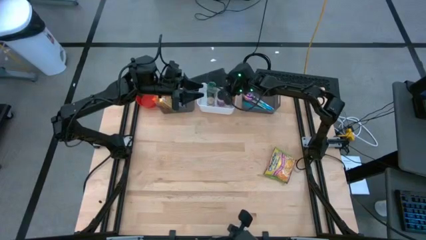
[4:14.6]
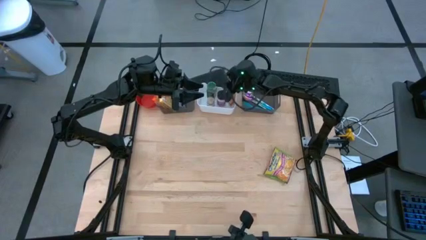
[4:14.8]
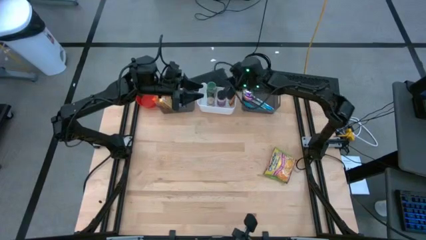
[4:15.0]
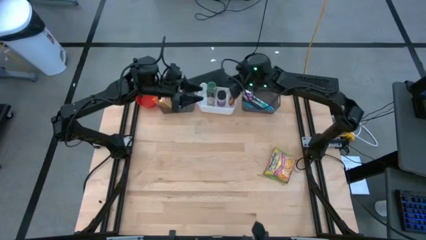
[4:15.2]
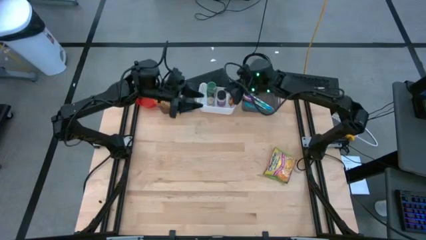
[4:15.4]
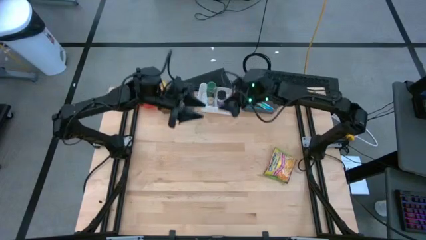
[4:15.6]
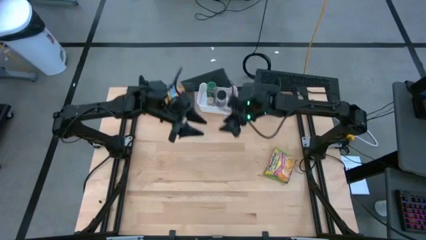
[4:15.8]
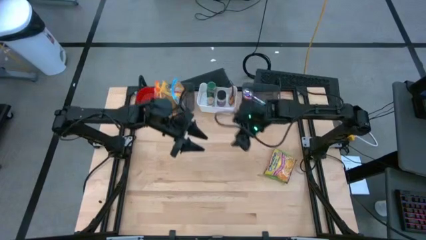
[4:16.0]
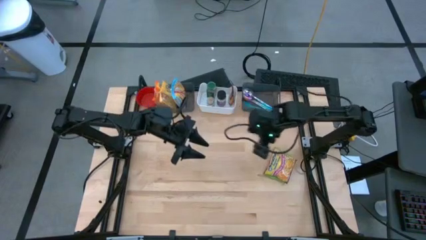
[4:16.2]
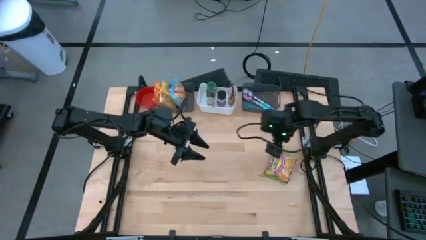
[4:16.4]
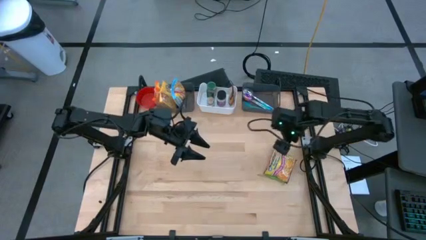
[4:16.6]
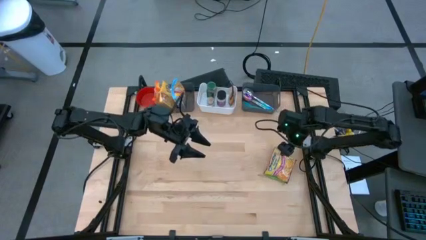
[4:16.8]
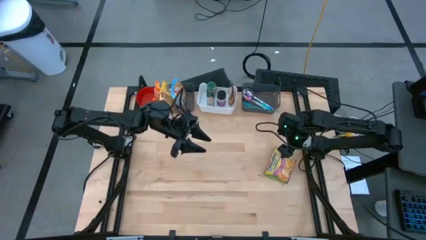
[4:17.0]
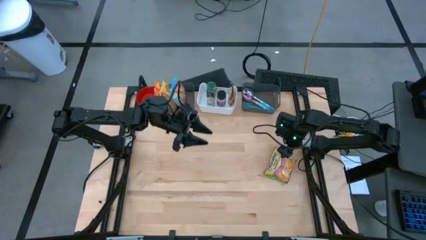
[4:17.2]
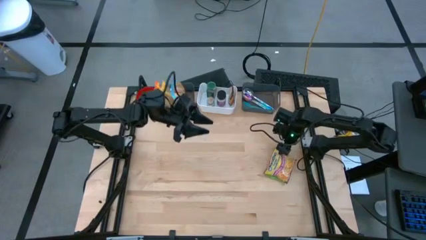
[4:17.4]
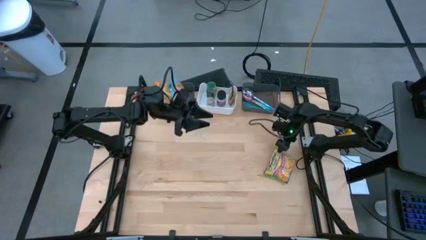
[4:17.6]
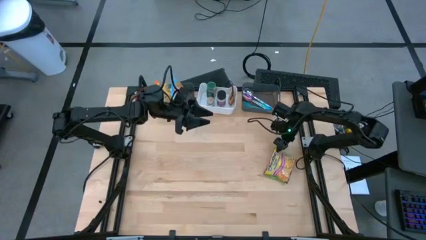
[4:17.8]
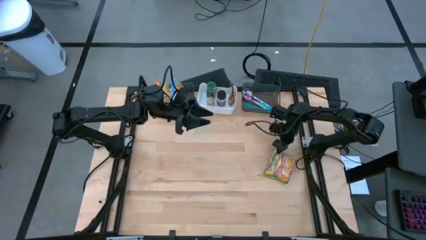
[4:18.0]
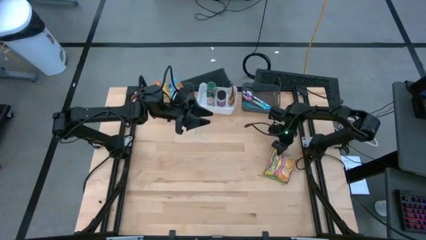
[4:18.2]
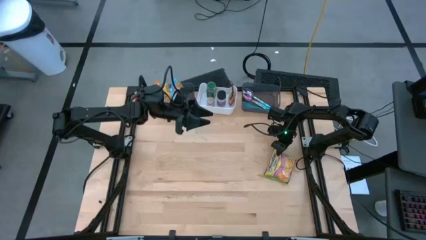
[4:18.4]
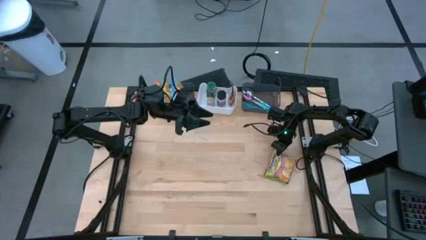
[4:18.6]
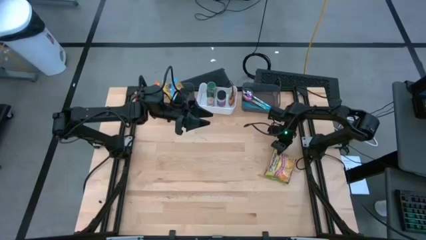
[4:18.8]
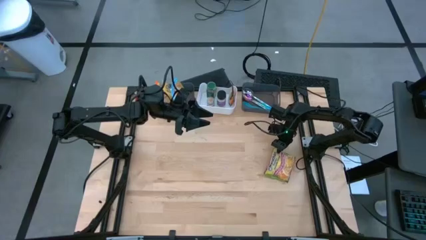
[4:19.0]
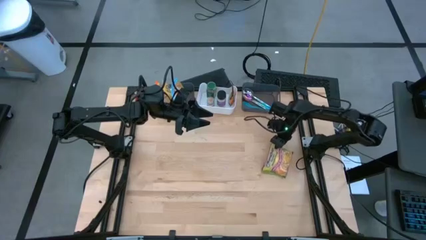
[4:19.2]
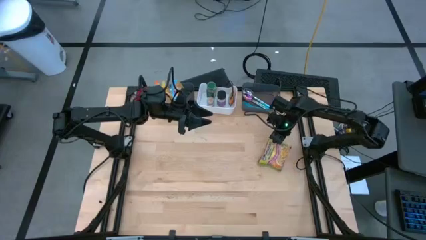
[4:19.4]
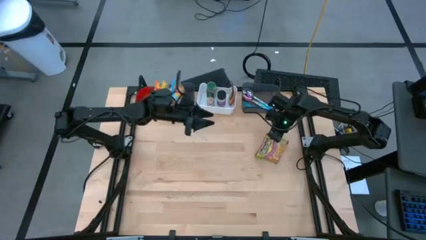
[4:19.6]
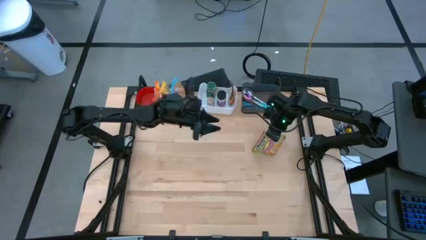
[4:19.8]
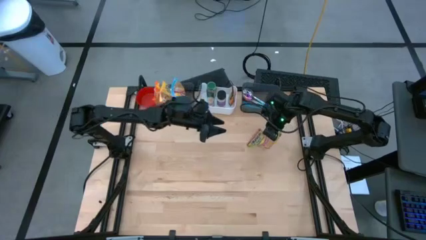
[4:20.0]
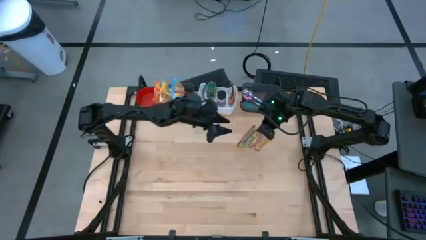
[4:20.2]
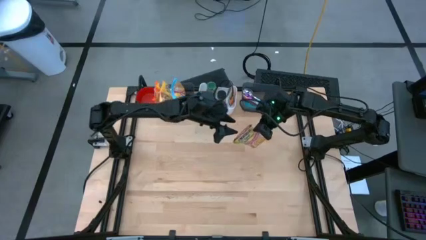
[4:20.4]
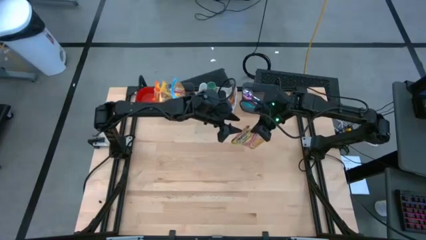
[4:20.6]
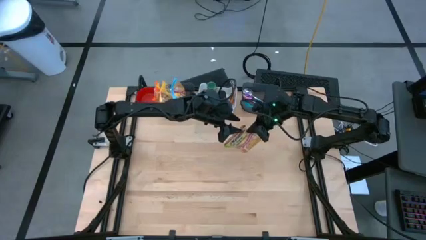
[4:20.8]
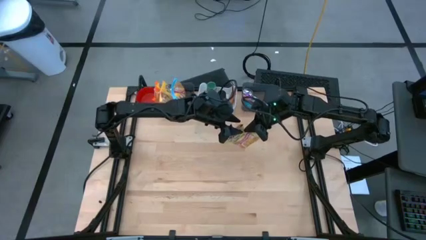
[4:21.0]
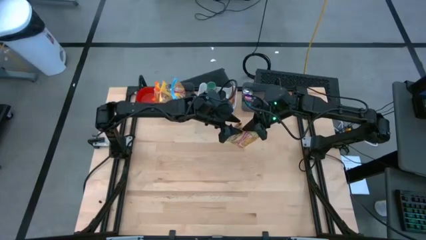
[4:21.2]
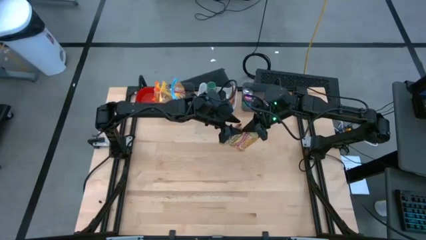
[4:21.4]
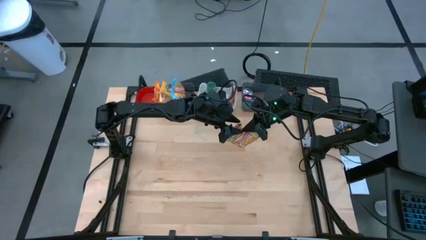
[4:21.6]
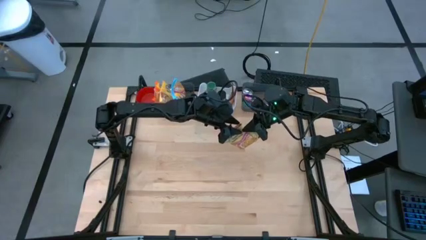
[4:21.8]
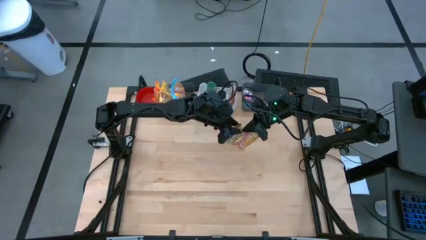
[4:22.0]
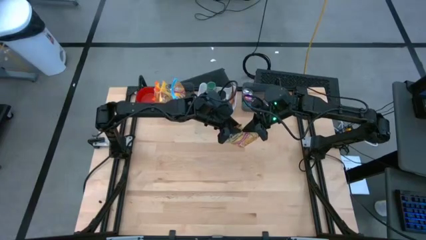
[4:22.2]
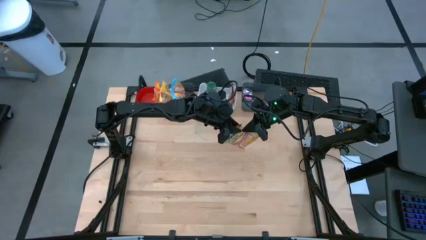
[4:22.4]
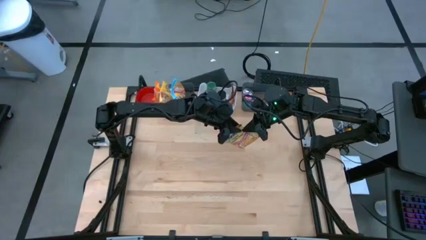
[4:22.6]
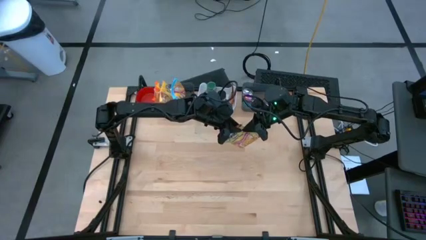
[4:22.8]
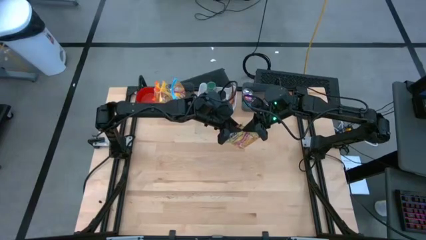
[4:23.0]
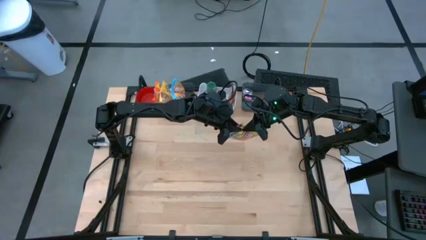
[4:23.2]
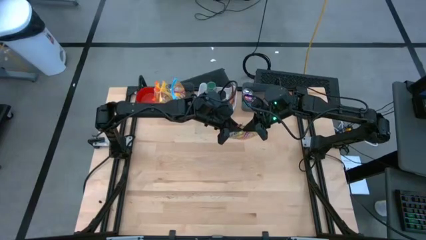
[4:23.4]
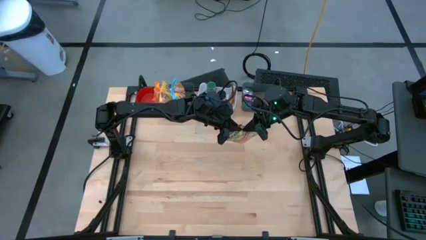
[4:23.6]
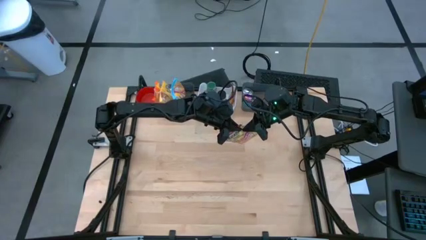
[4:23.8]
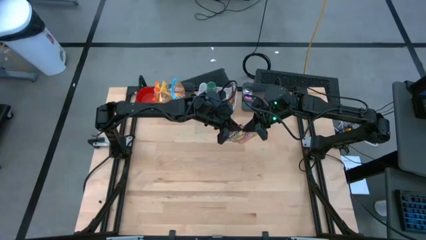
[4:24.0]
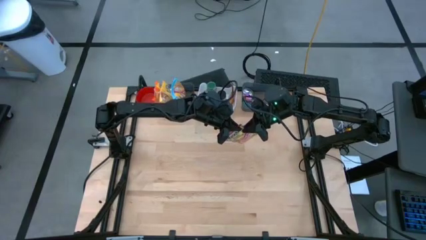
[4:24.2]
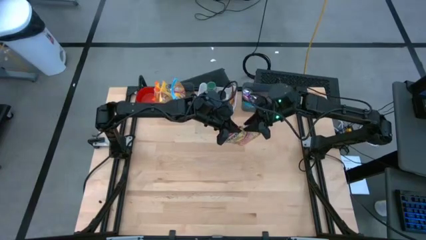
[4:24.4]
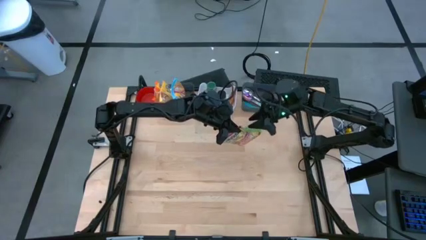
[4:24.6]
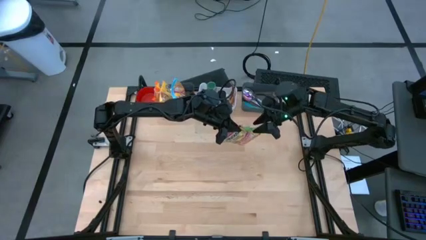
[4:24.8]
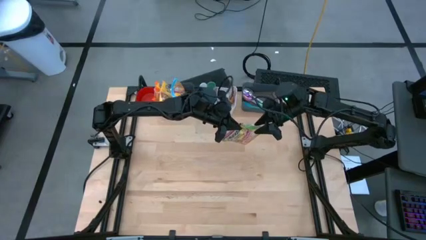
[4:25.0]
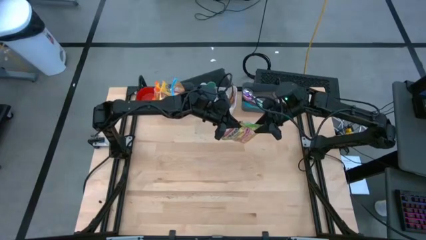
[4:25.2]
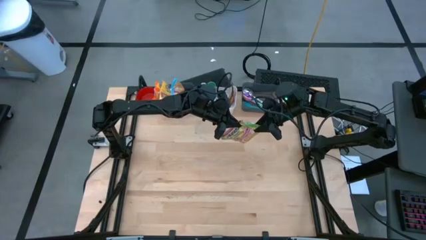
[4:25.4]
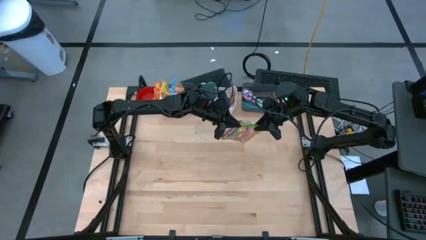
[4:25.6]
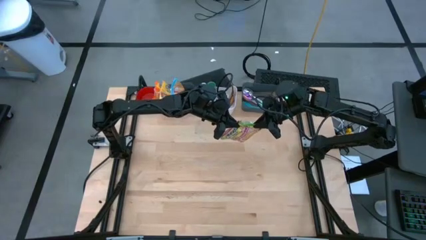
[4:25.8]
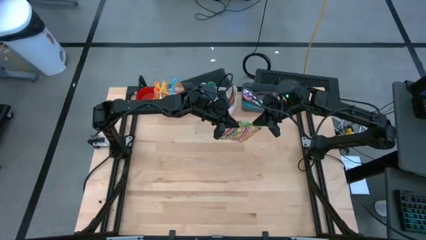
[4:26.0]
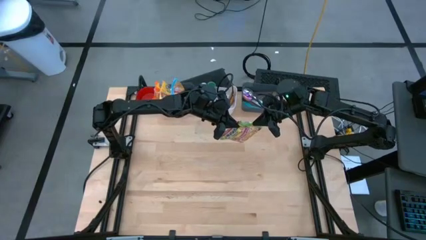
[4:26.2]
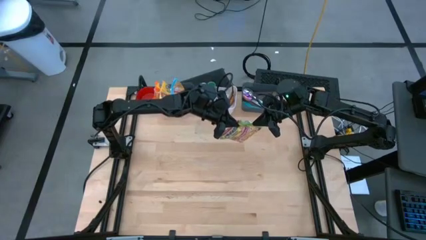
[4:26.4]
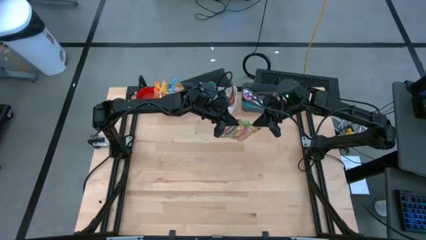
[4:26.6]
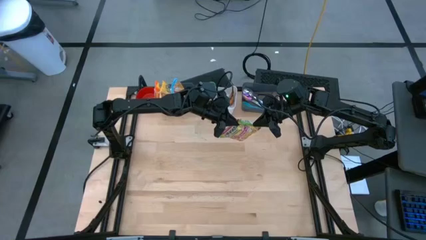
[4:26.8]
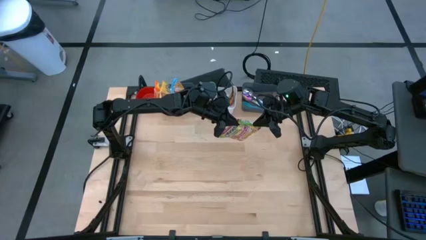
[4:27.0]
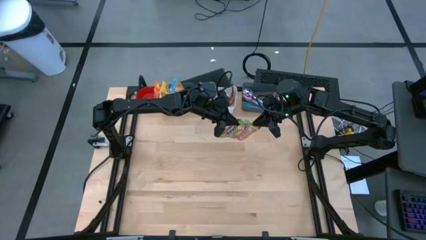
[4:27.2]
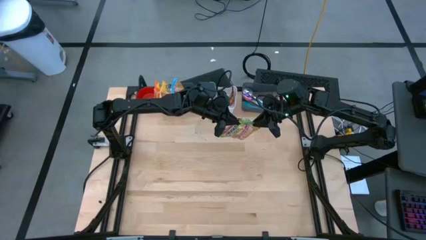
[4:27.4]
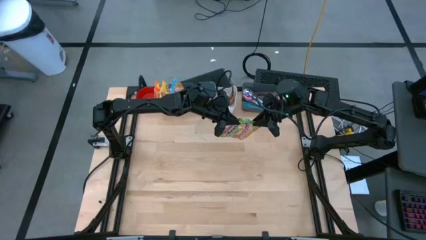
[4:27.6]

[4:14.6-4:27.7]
Task: Pick & Place Food Item
Put the green noodle pack into the left black bin
